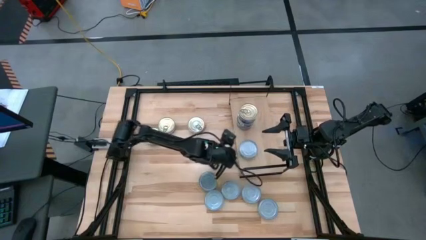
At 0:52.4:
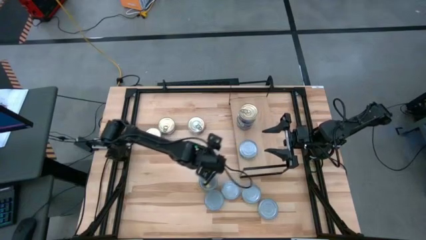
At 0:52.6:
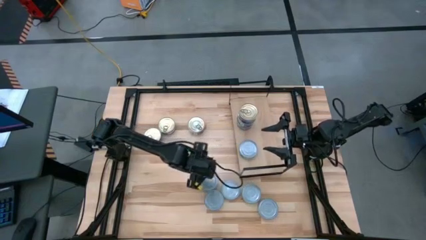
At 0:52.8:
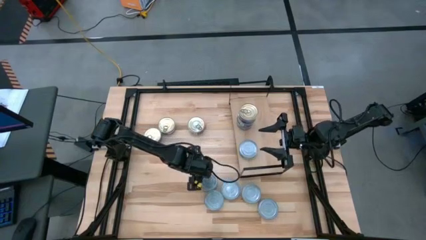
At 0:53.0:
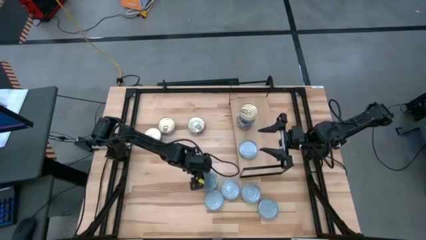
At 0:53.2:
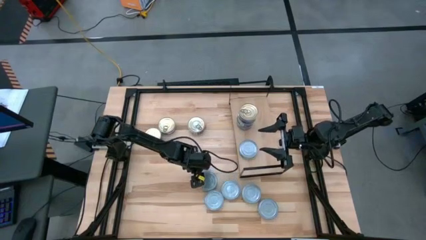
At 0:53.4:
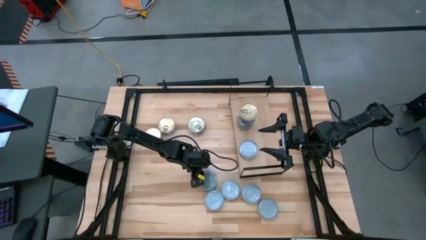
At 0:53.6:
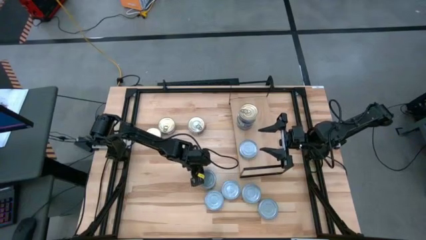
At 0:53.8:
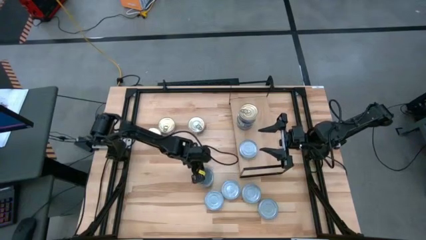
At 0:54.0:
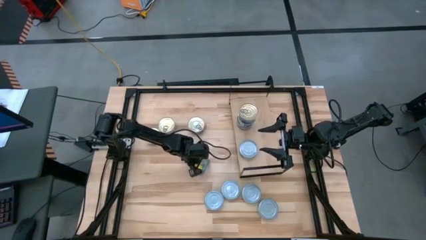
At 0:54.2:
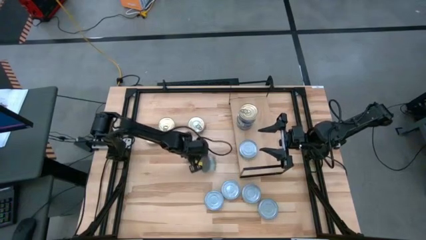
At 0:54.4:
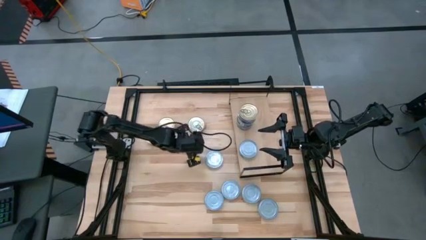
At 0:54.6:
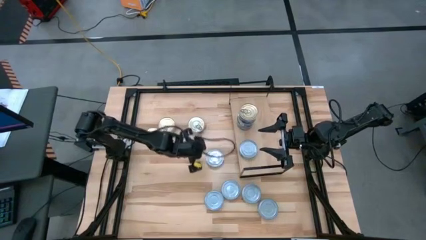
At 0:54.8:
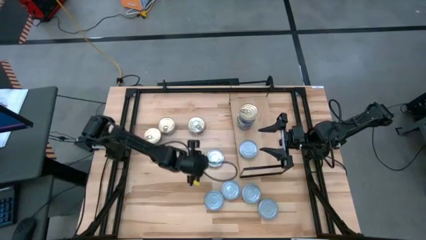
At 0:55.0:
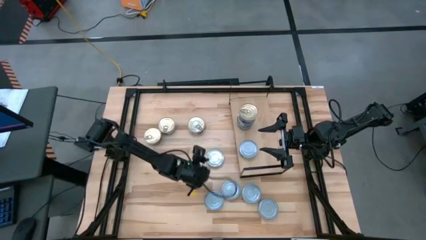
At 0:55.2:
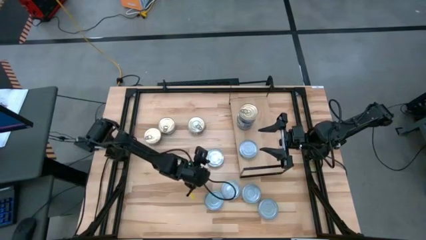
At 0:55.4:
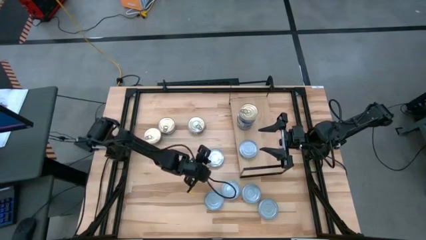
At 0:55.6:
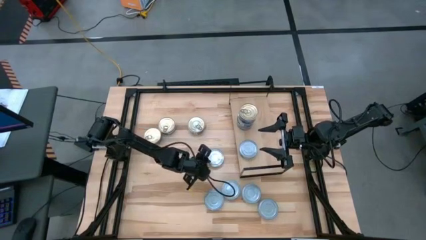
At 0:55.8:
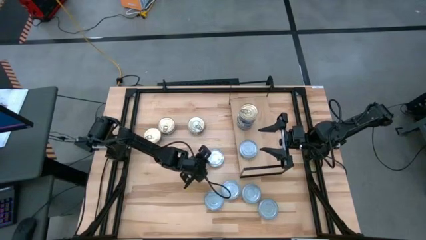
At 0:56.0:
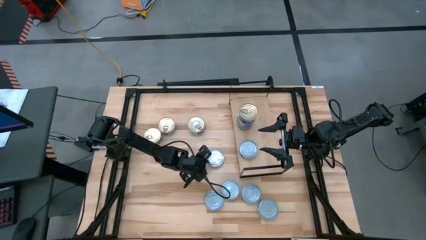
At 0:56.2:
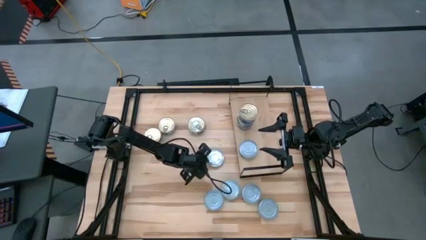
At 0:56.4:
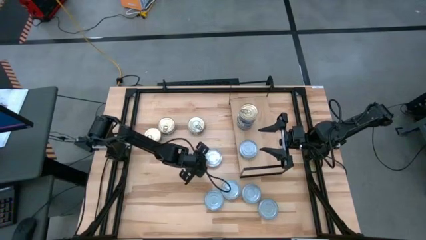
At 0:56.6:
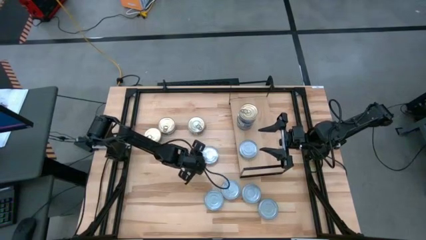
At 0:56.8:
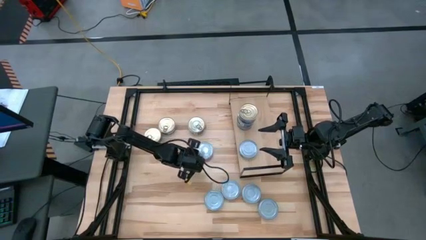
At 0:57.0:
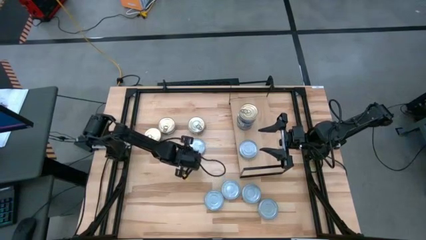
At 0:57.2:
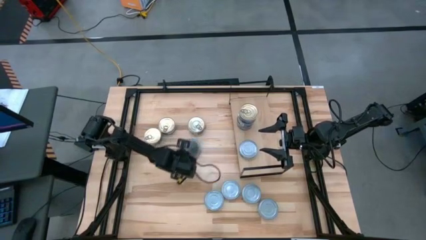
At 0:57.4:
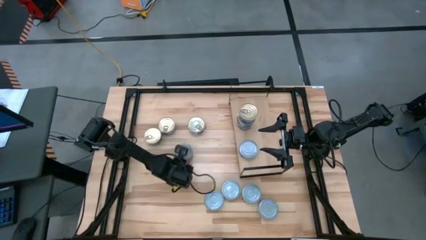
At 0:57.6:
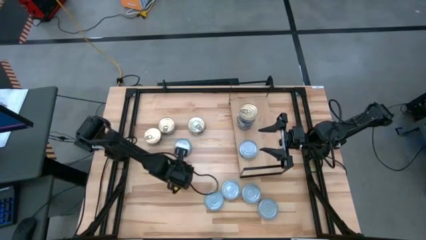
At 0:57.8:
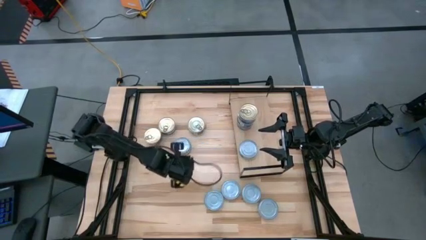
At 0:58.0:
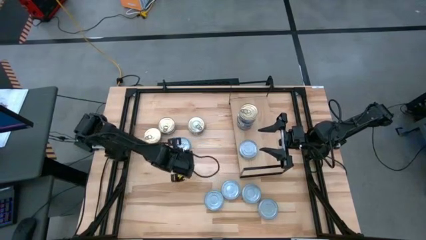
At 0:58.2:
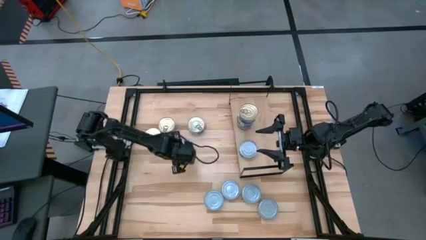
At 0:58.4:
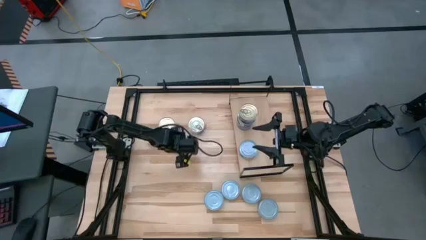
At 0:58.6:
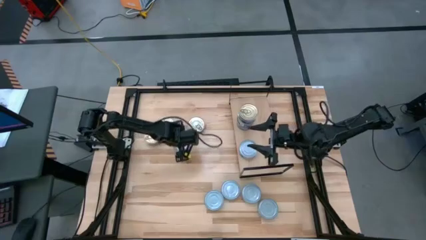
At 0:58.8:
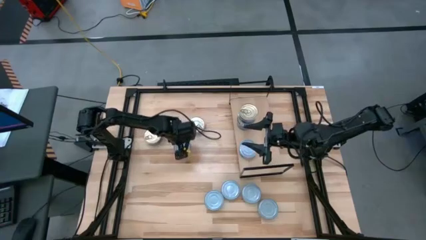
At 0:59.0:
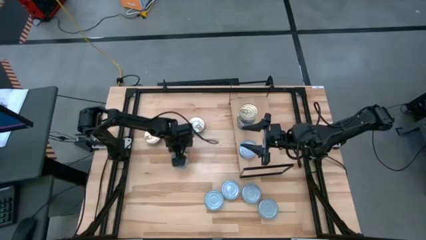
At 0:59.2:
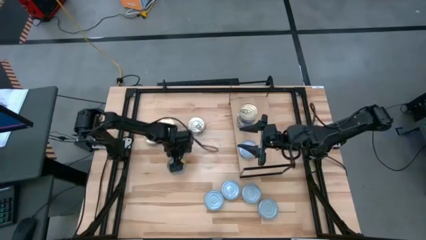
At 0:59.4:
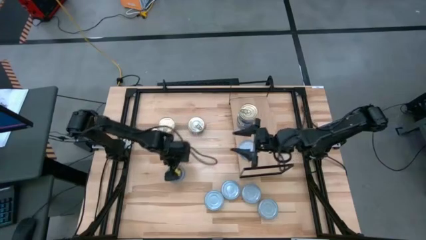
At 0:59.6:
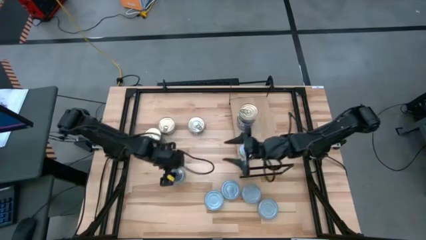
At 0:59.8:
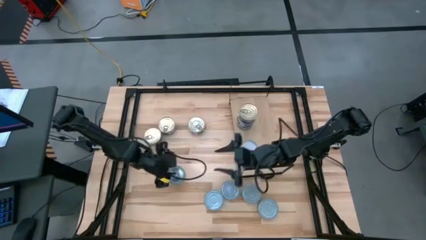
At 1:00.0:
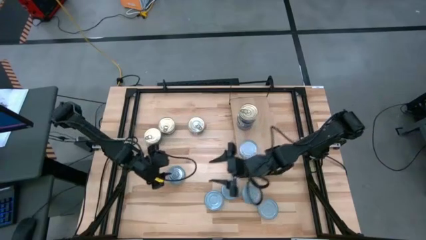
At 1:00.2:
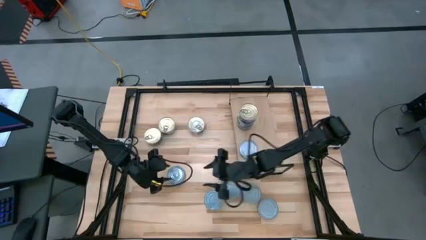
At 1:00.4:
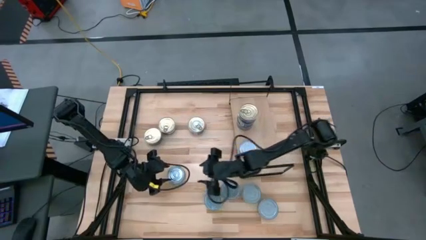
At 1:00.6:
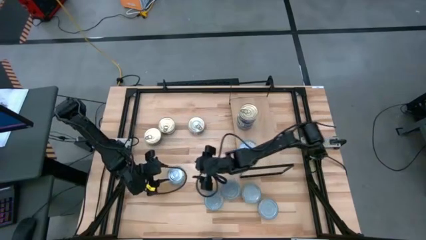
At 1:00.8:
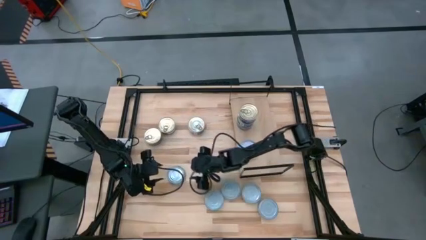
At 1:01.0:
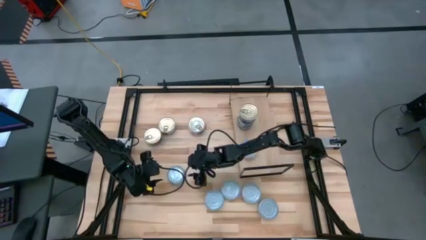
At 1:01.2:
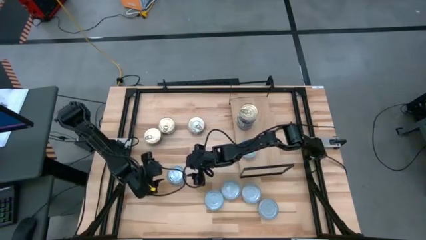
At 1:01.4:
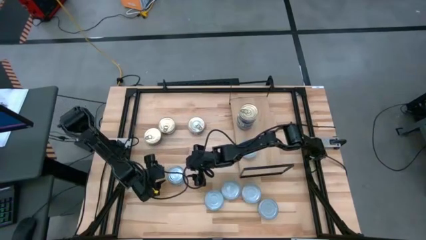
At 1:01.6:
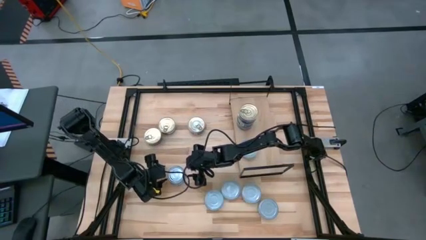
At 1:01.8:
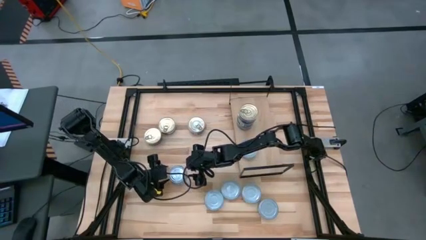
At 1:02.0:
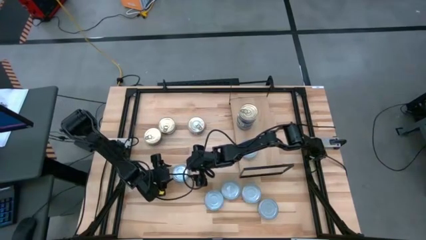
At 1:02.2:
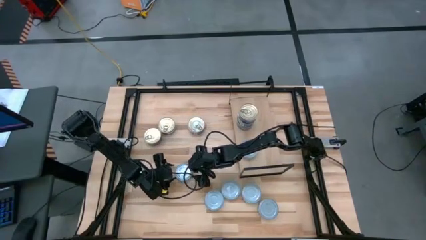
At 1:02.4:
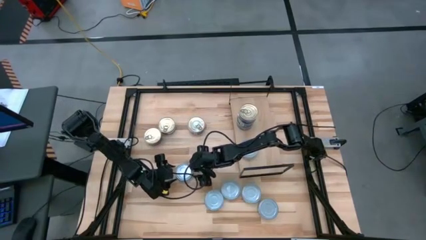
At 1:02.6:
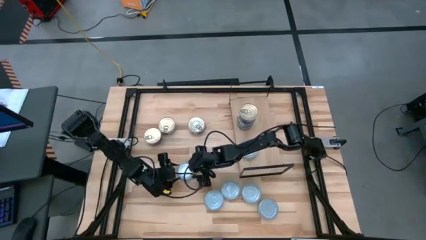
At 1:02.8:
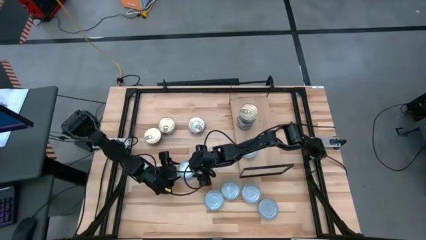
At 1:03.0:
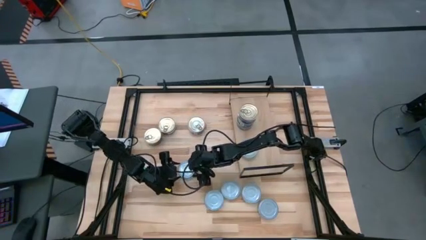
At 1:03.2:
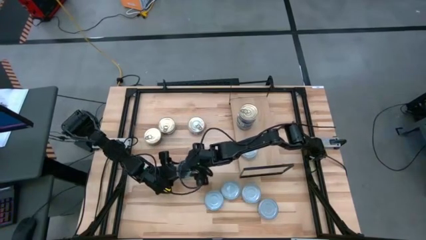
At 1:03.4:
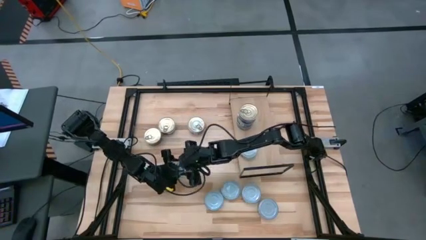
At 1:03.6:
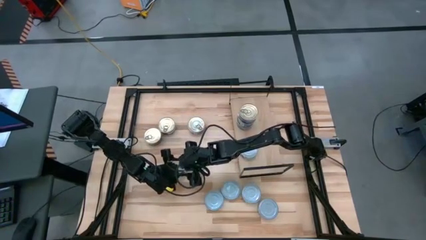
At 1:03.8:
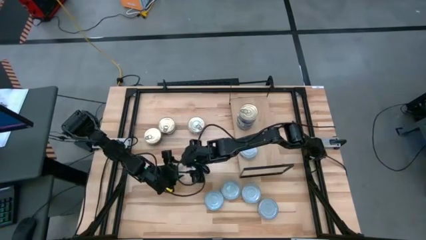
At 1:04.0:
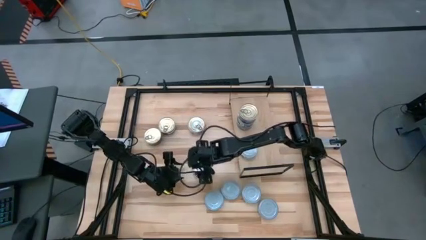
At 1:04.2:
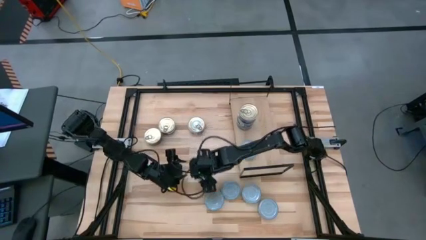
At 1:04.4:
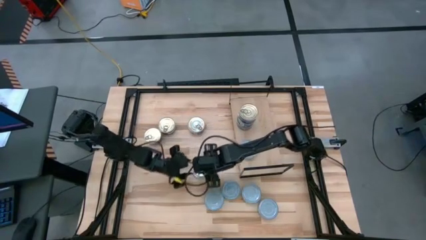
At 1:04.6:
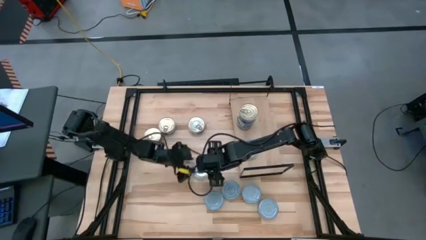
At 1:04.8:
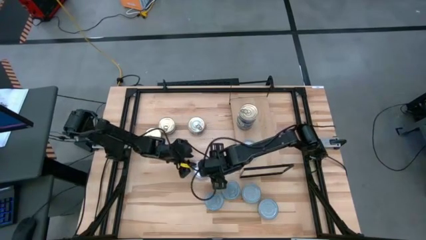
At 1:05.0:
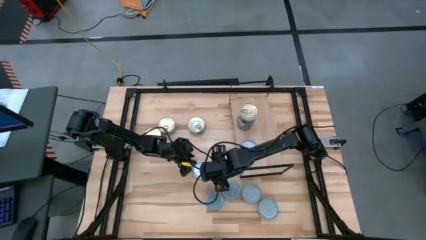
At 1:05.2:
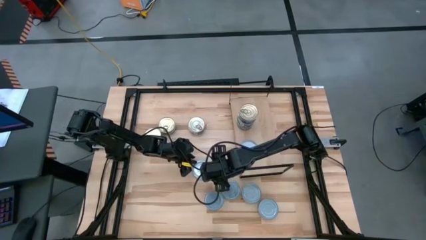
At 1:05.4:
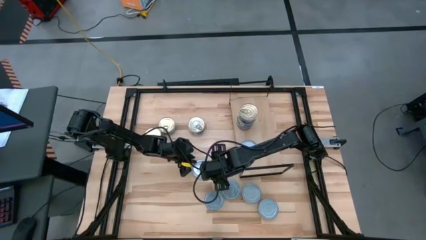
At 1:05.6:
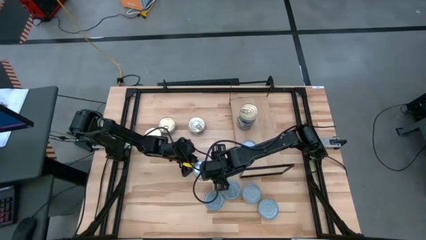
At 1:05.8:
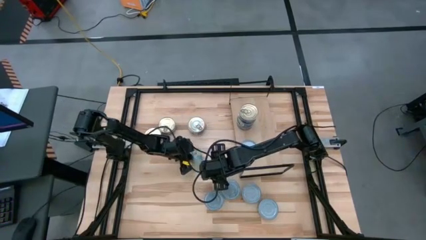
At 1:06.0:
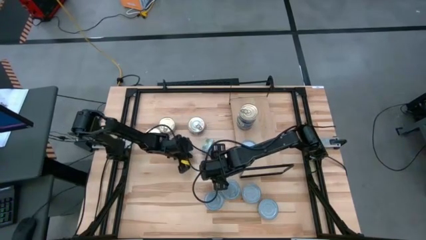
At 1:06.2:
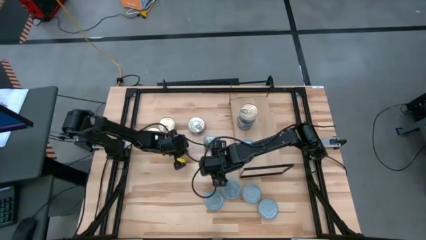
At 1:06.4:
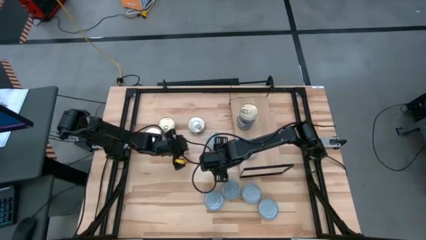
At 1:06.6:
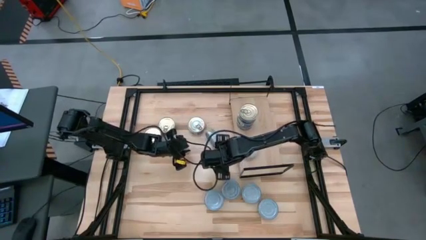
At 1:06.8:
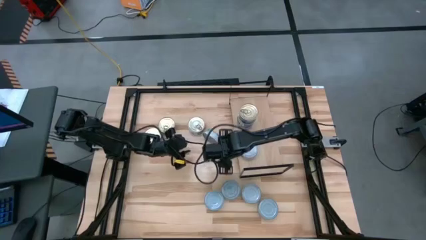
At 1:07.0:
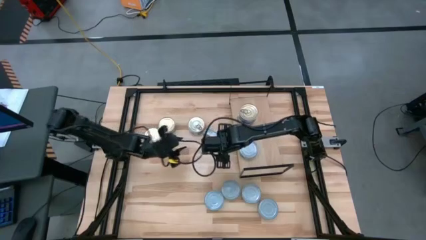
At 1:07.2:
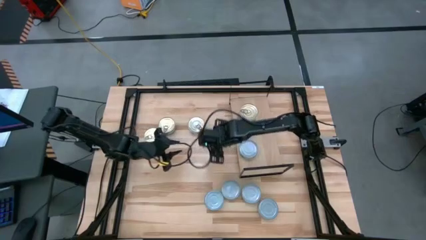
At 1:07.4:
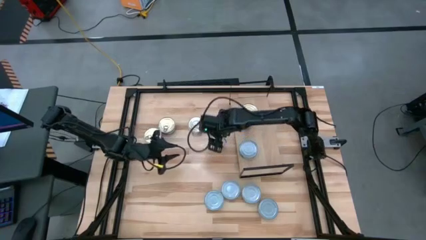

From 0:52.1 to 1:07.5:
Task: Stack canned seafood by type on shelf
Stack the green tuna can on top of the other green tuna can on the shelf

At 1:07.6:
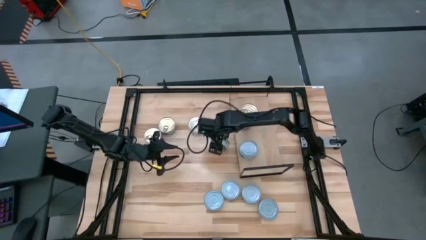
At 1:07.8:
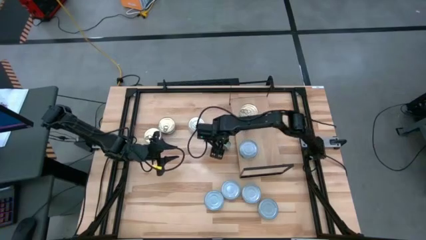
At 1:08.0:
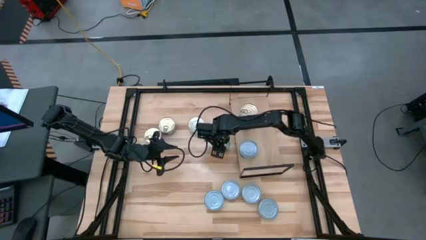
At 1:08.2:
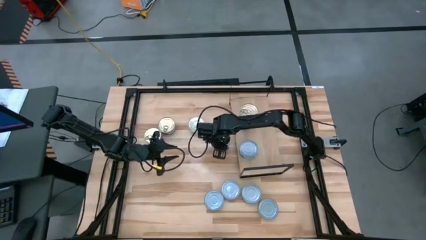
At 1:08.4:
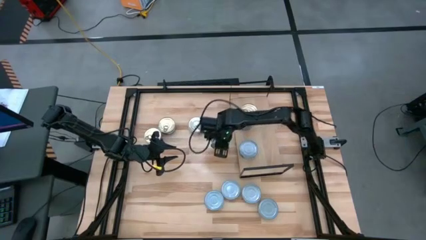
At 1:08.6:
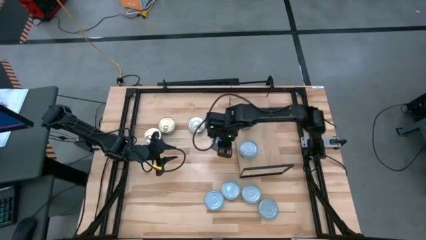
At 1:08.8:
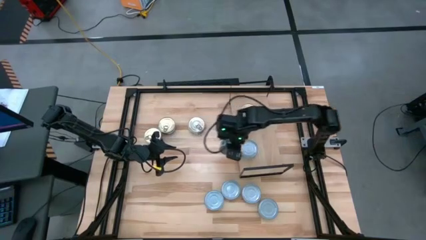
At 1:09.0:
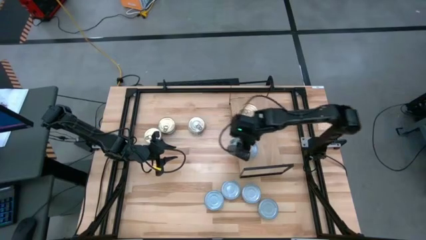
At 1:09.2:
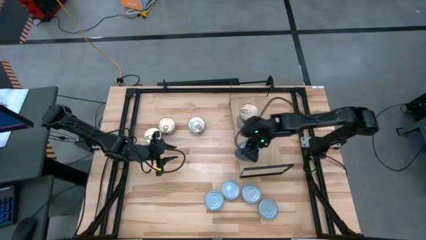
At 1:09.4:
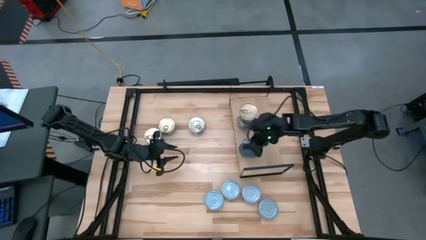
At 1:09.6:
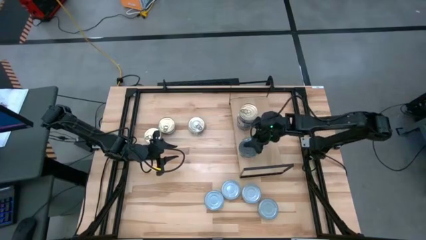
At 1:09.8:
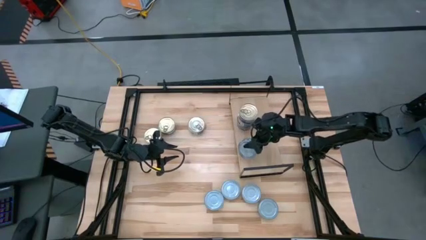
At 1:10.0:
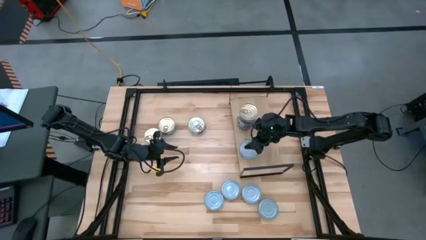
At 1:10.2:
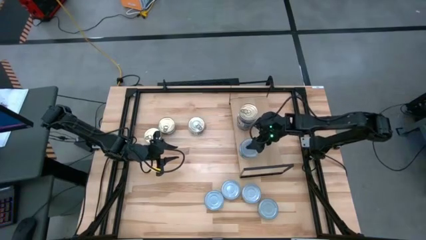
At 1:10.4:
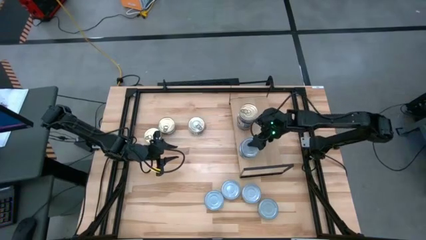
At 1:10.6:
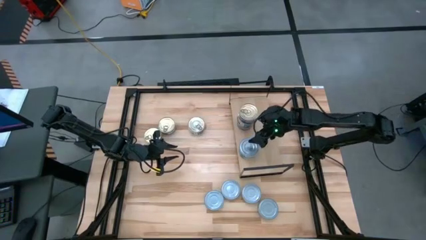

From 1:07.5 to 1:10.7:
Stack the green tuna can on top of the other green tuna can on the shelf
